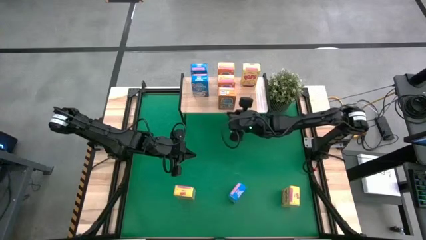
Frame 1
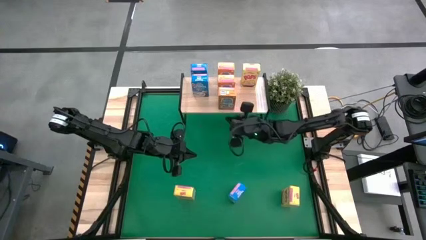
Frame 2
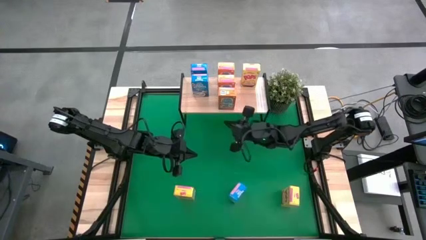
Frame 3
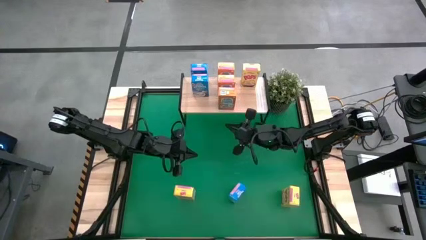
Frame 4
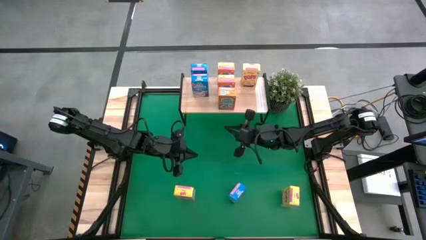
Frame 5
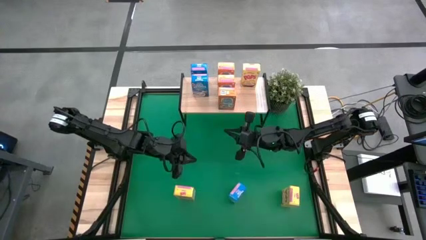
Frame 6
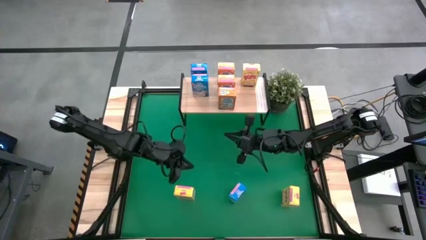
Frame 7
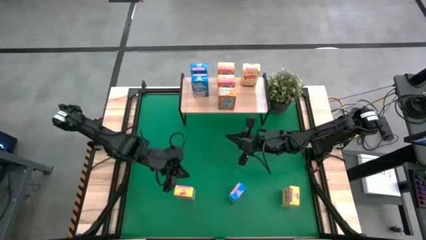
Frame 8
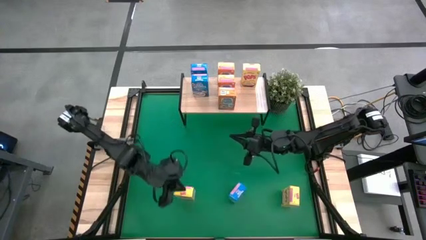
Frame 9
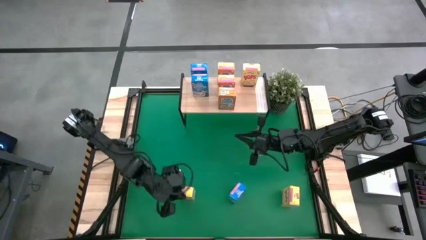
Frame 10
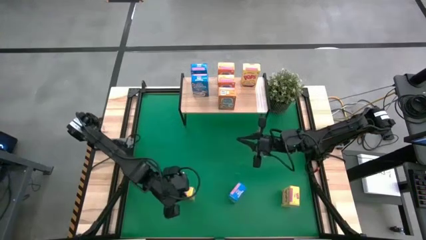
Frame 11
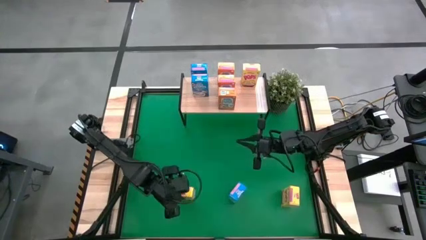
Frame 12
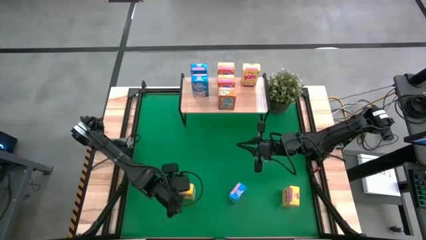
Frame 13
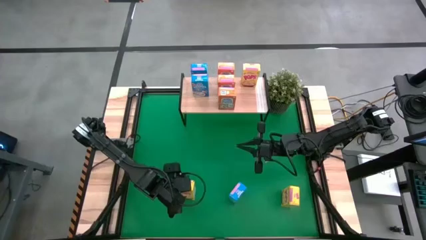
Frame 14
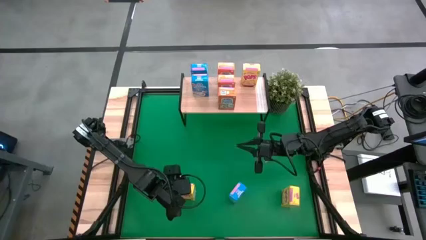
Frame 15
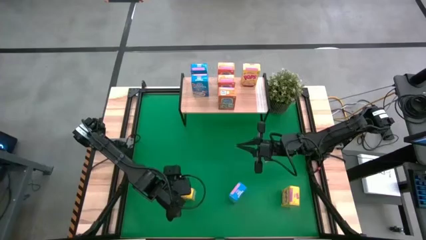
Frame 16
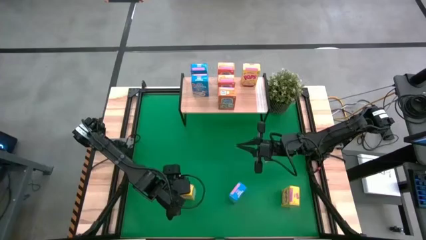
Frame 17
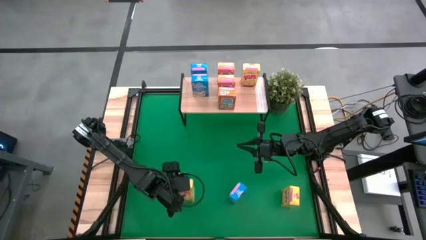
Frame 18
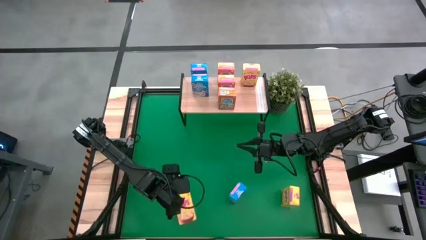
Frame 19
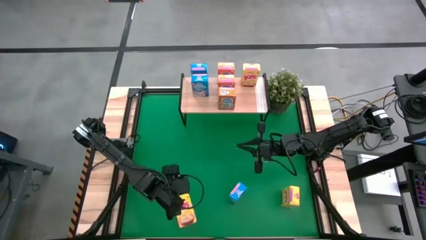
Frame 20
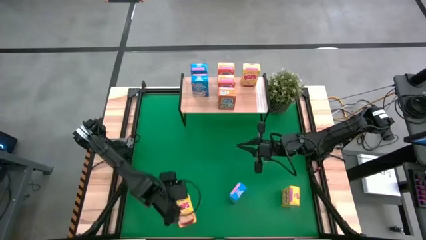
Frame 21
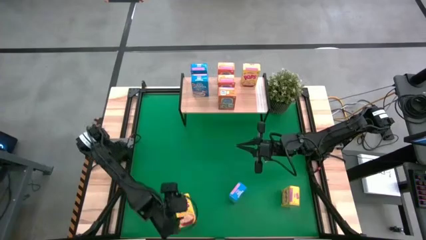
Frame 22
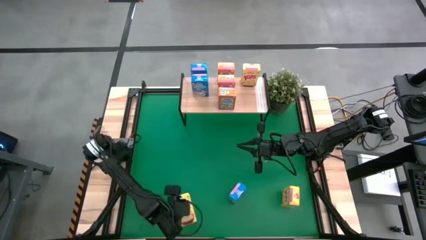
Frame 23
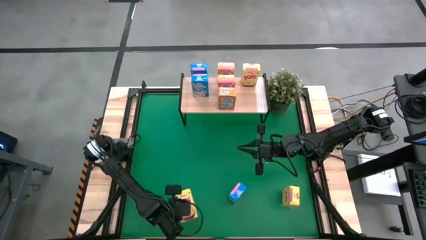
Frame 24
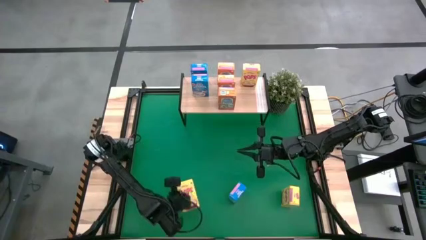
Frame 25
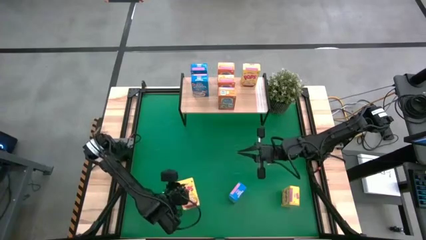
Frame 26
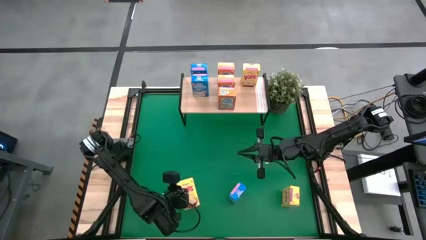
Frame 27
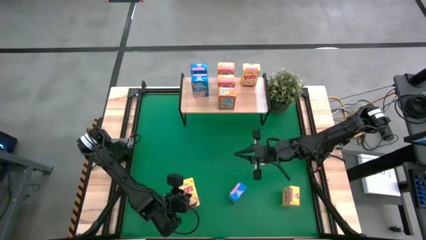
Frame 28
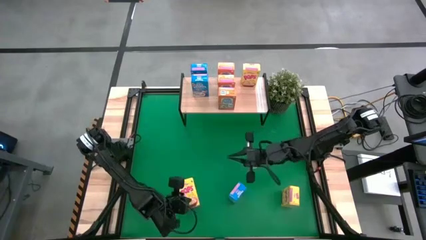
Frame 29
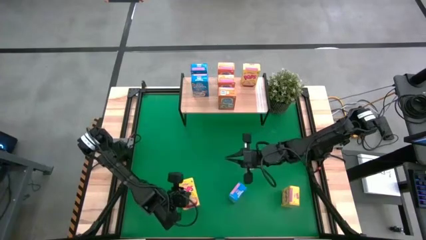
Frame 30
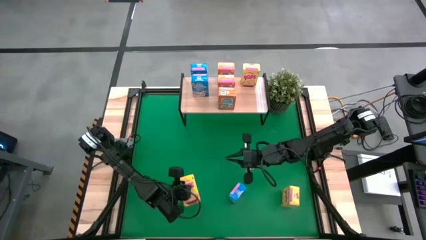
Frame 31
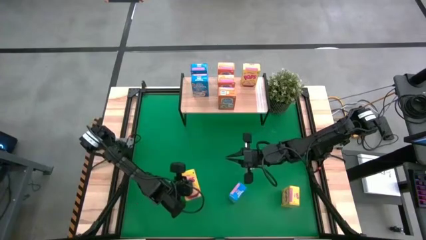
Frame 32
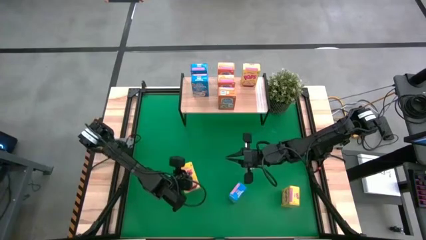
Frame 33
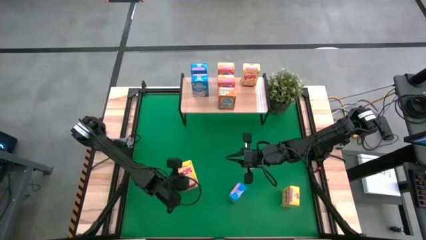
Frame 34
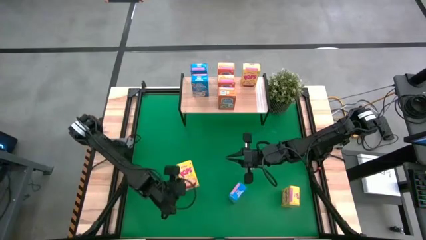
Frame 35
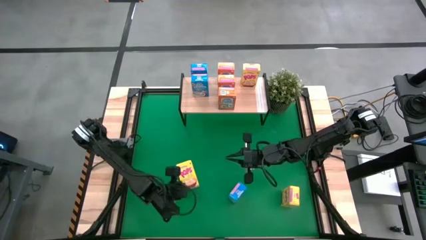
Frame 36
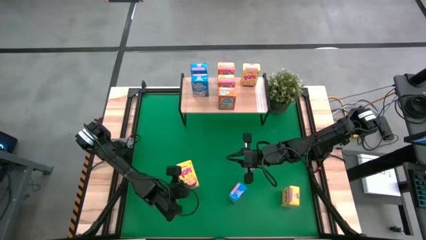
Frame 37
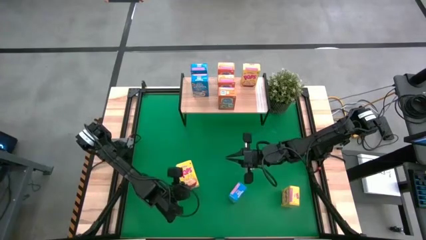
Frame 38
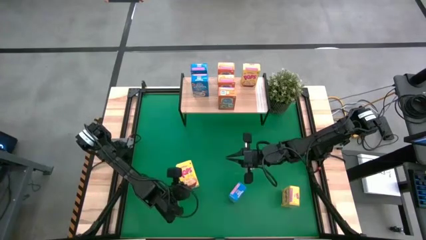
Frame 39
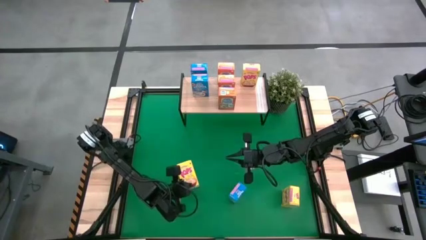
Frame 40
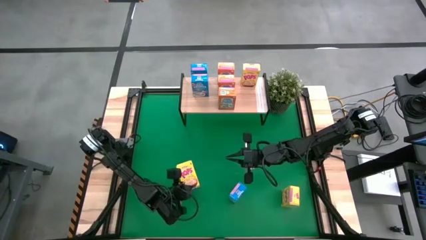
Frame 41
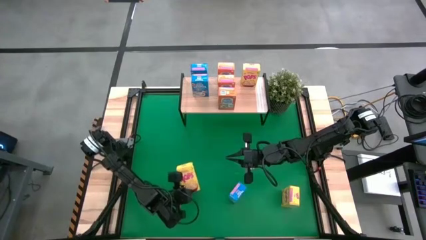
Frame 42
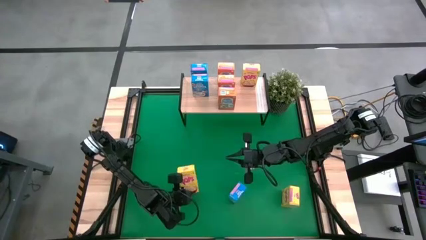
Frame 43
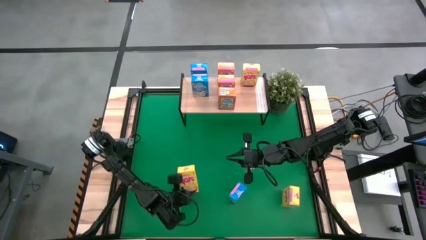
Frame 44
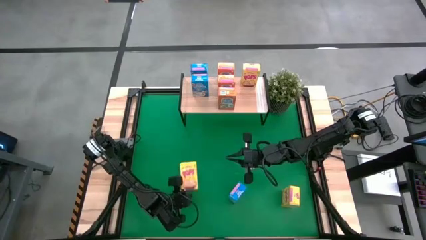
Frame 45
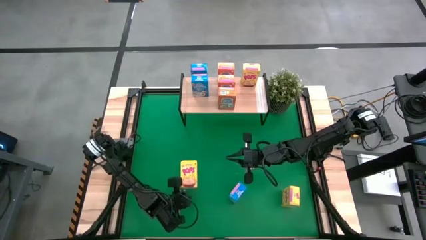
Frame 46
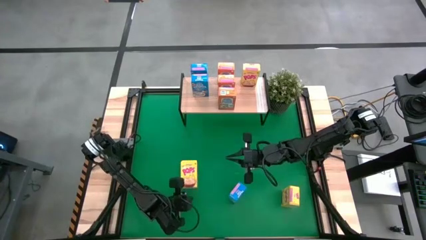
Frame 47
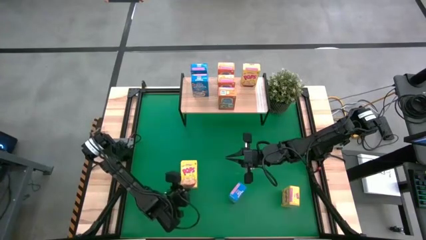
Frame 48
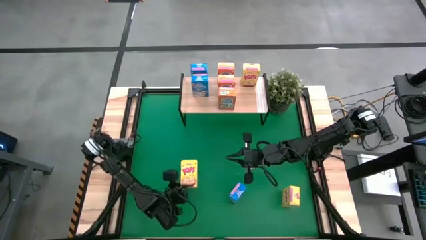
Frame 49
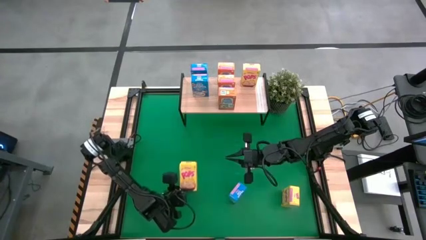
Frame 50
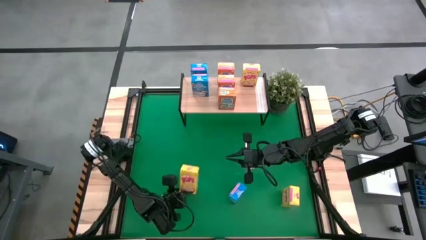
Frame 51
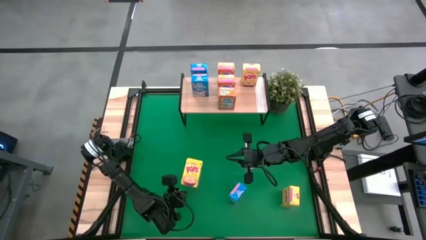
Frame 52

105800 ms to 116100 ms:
Task: Stack cereal on shelf
Put the left yellow cereal box on the shelf

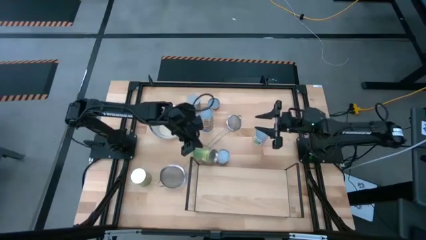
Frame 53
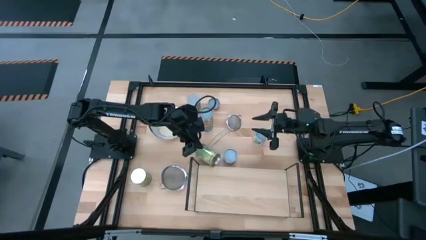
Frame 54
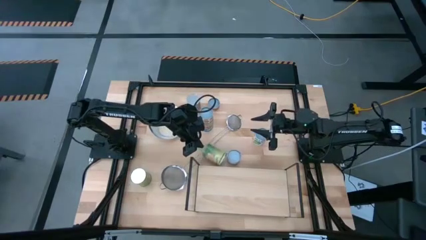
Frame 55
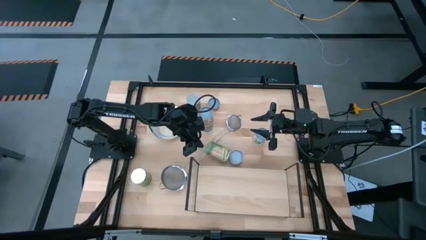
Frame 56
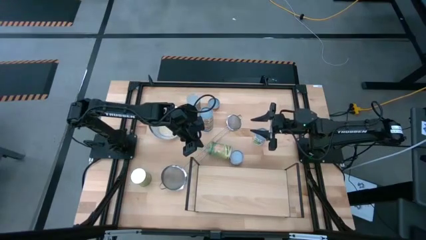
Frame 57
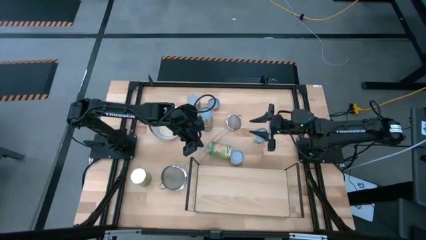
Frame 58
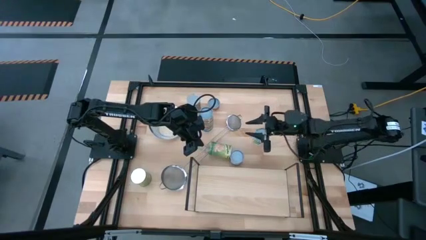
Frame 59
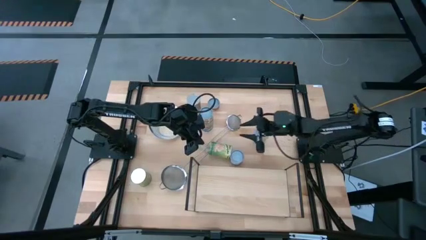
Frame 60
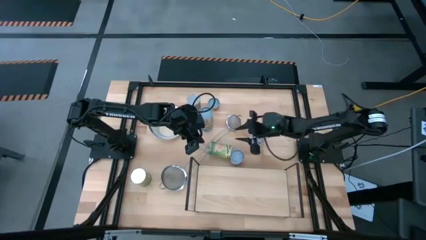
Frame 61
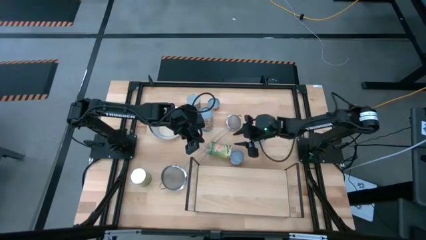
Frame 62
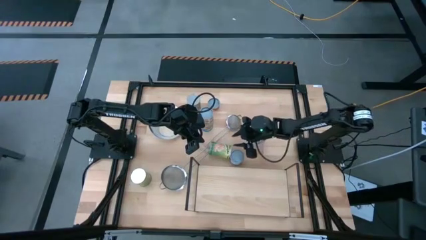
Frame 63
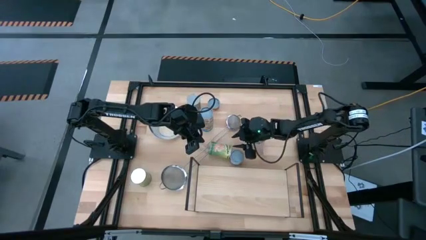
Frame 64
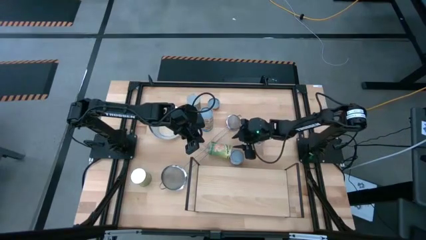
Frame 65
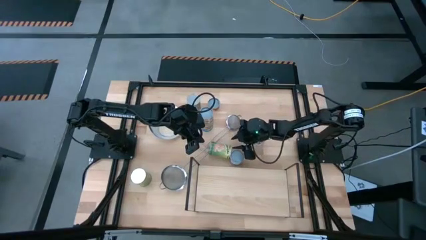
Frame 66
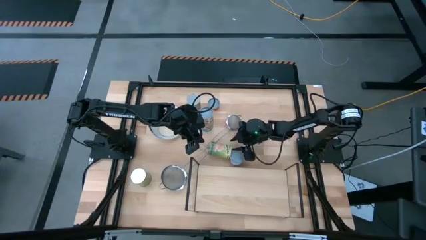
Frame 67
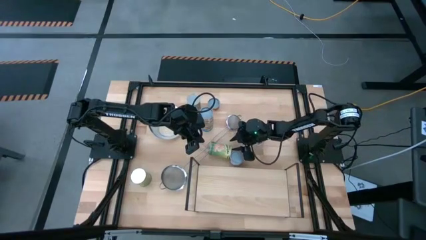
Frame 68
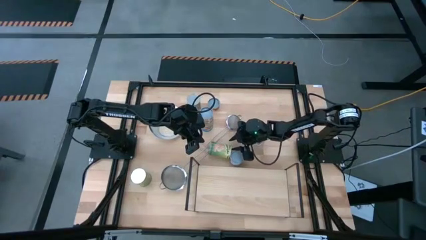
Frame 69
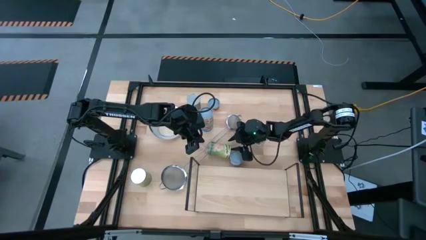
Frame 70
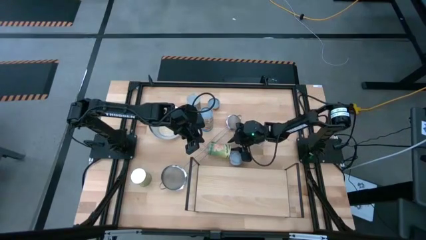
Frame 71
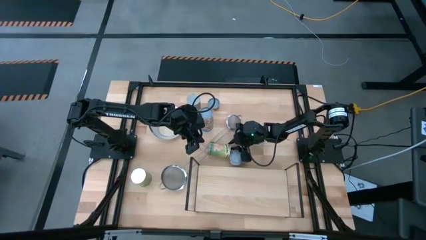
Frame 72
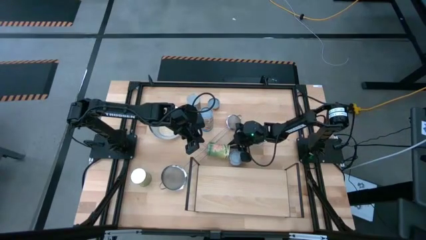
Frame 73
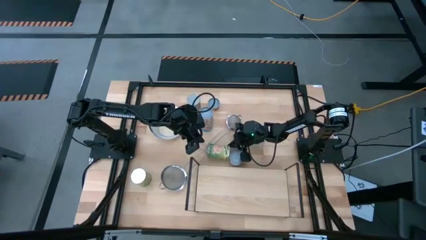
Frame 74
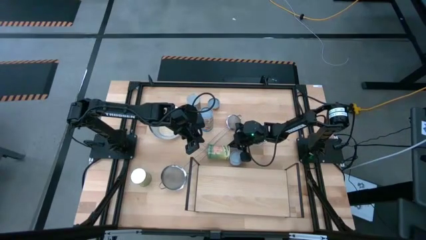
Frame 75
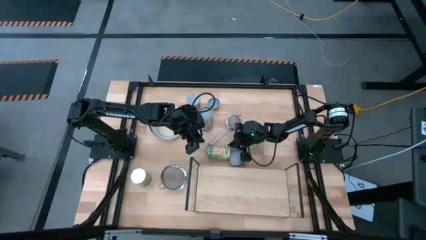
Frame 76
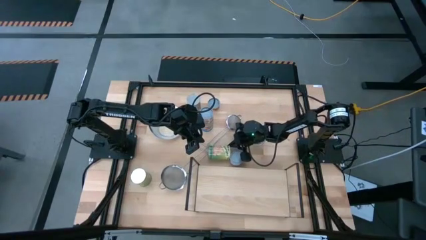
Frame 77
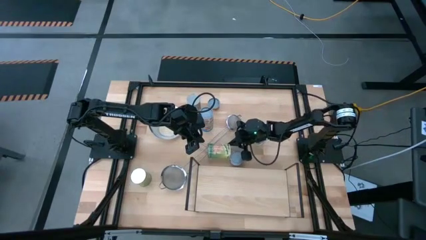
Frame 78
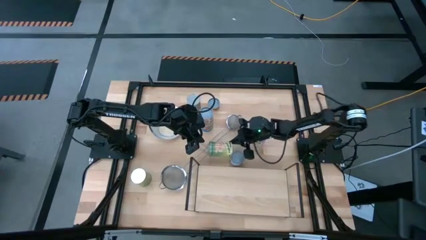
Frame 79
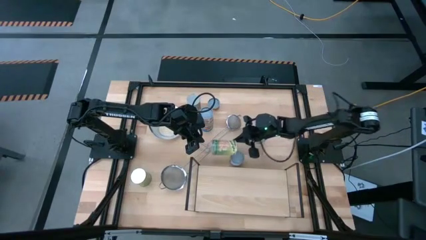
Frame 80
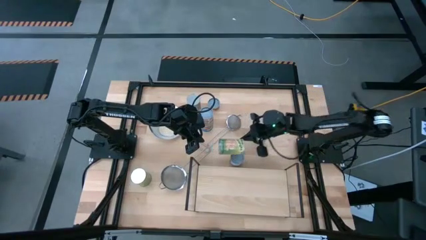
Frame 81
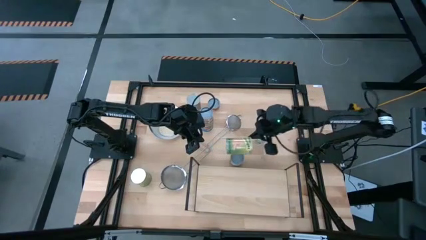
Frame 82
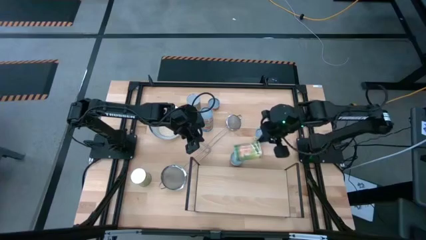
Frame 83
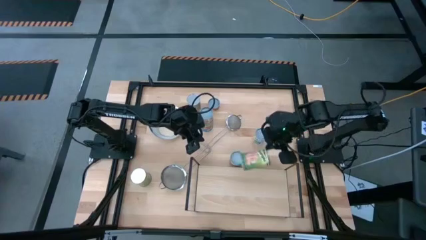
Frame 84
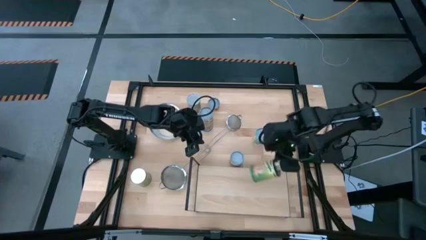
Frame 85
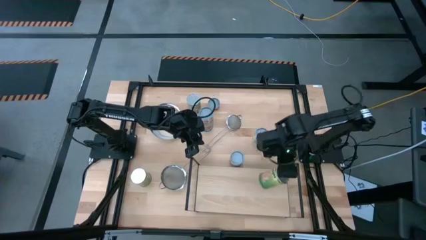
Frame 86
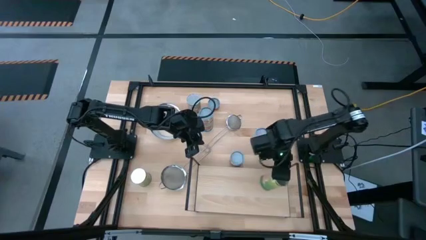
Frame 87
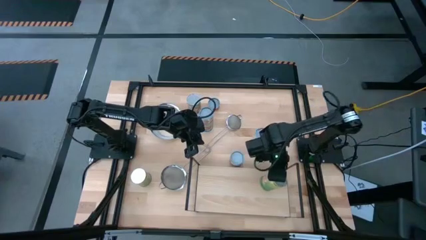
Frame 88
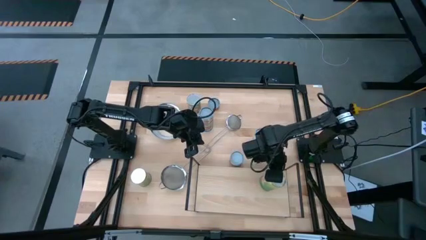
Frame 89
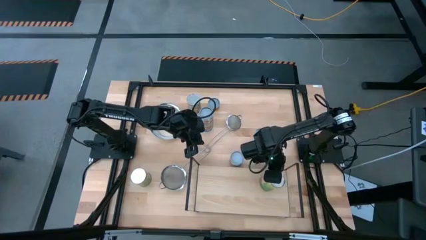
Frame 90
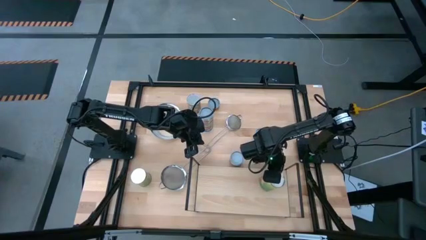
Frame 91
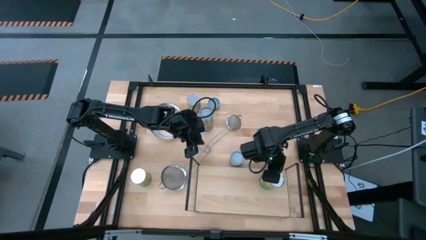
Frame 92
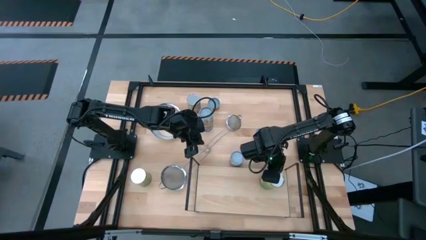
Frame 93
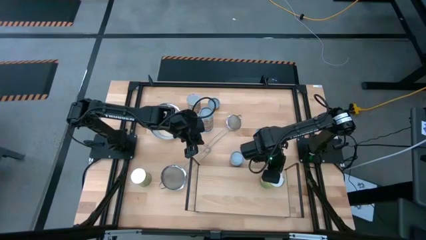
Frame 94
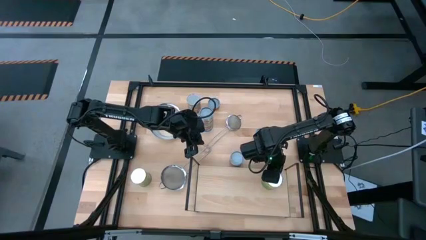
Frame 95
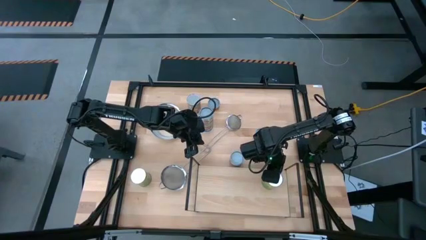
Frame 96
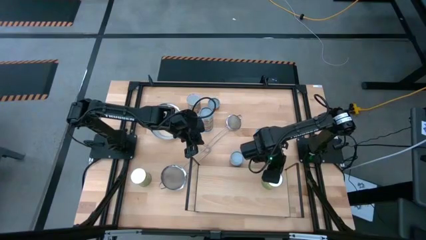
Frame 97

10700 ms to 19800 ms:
Task: Pick and place cans onto a shelf
Put the canned oranges on the shelf
